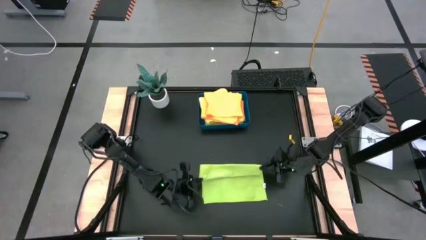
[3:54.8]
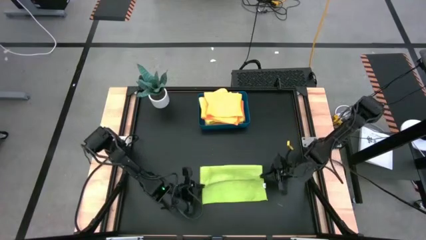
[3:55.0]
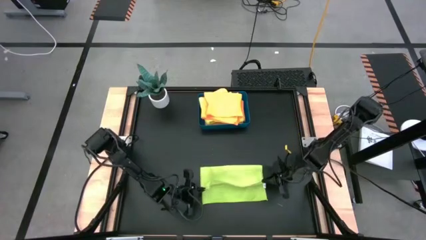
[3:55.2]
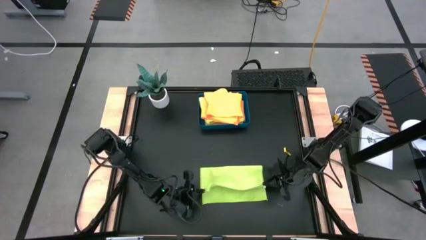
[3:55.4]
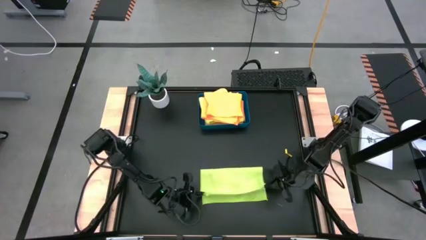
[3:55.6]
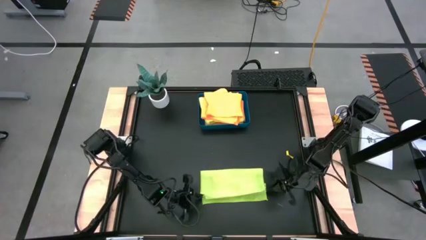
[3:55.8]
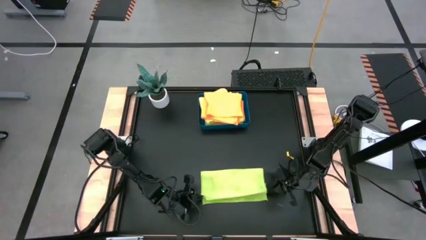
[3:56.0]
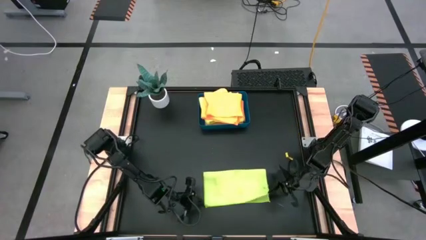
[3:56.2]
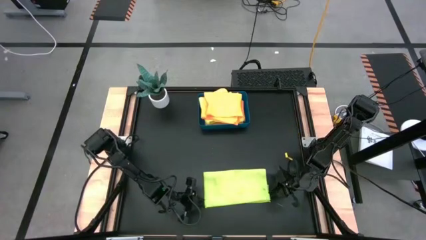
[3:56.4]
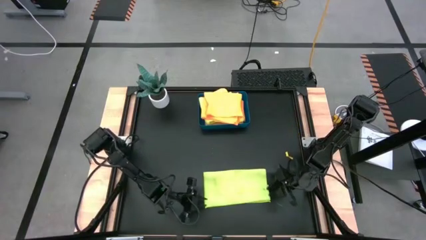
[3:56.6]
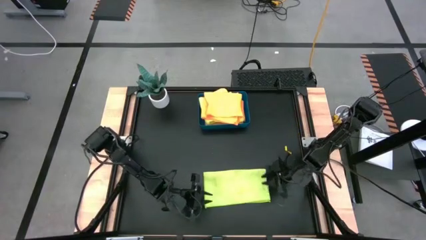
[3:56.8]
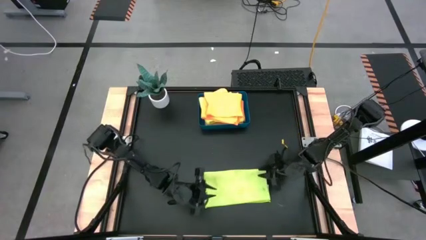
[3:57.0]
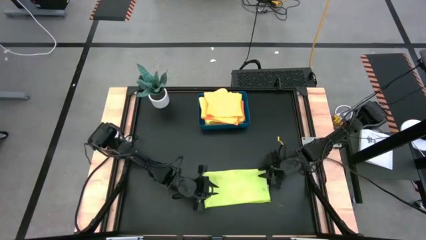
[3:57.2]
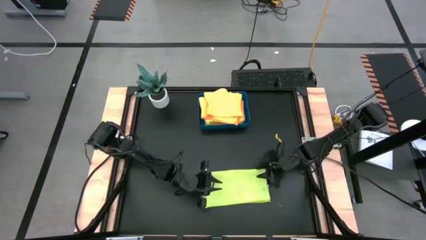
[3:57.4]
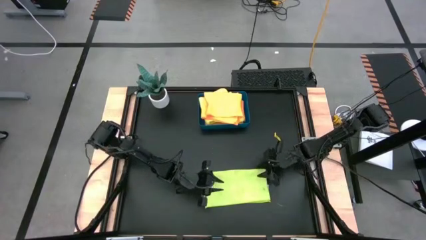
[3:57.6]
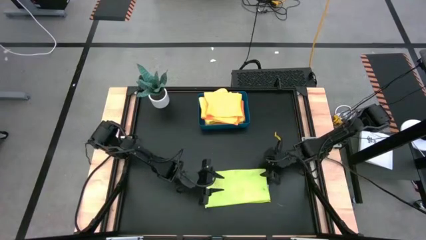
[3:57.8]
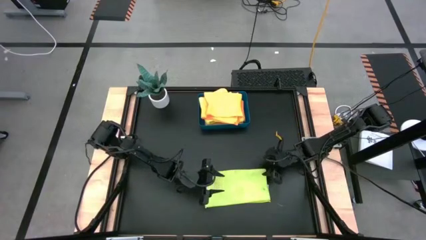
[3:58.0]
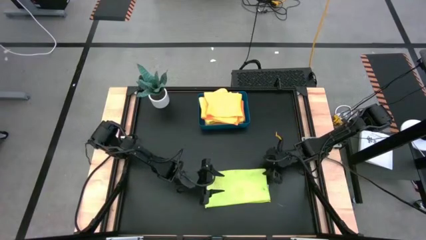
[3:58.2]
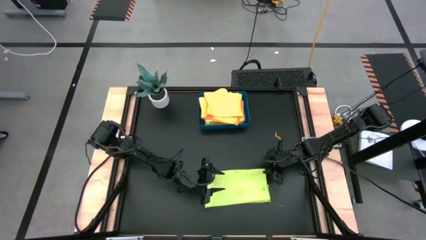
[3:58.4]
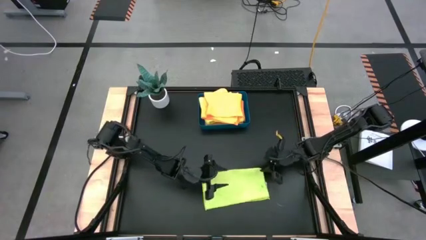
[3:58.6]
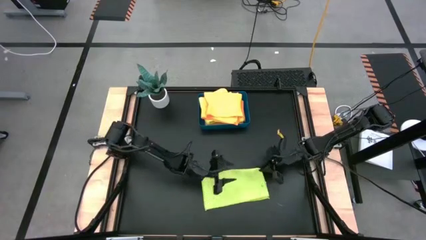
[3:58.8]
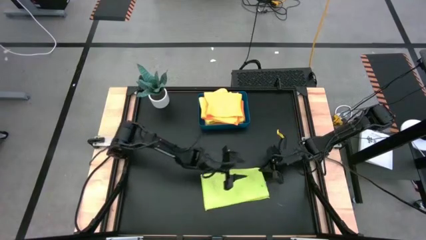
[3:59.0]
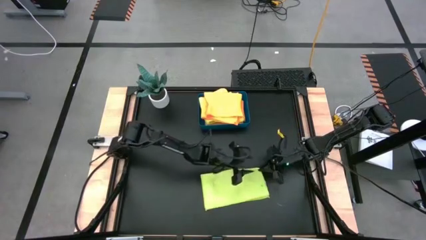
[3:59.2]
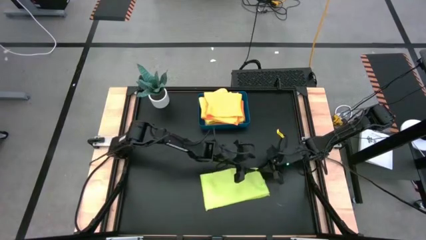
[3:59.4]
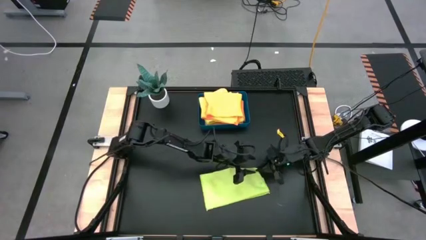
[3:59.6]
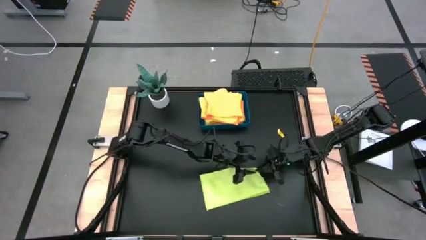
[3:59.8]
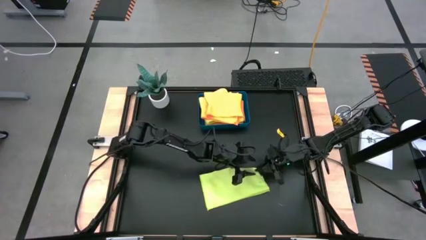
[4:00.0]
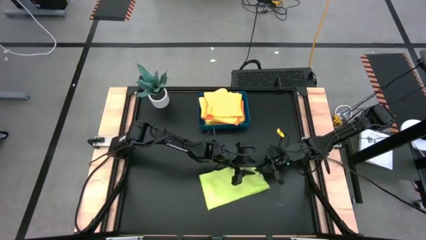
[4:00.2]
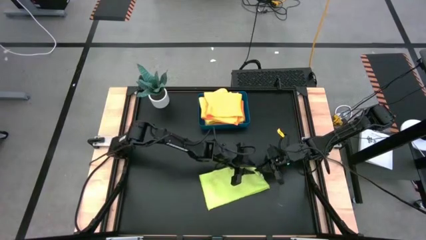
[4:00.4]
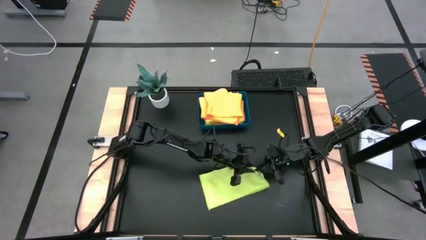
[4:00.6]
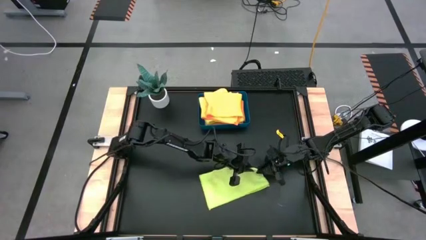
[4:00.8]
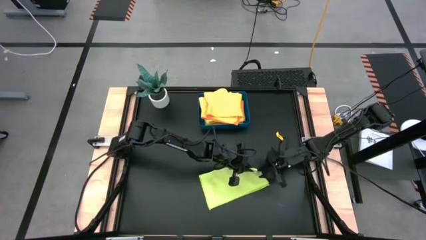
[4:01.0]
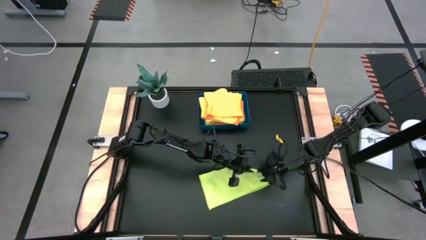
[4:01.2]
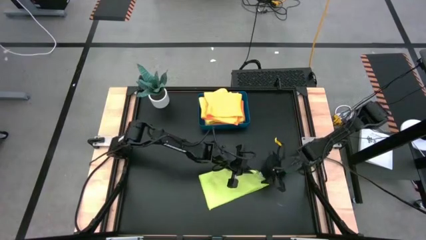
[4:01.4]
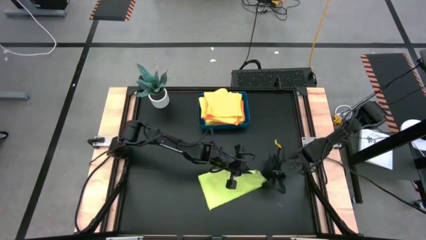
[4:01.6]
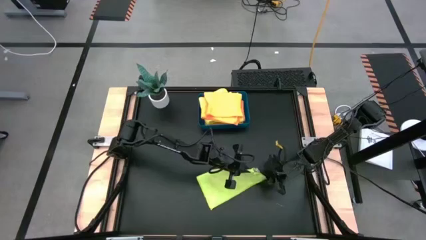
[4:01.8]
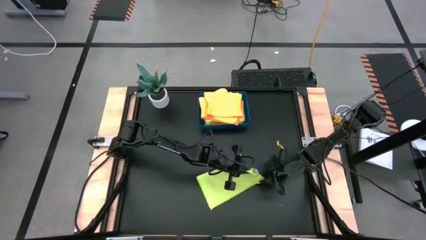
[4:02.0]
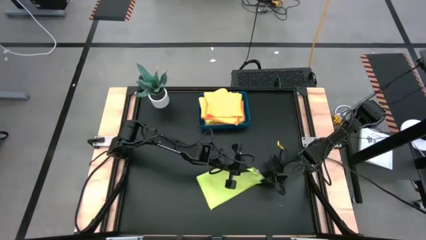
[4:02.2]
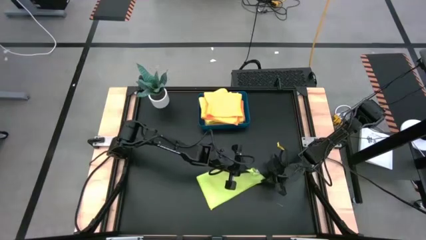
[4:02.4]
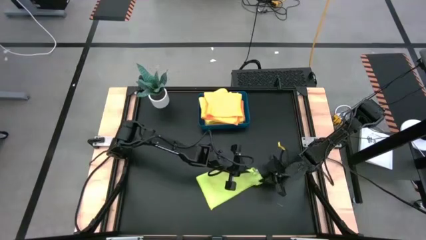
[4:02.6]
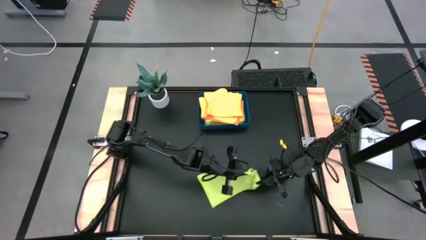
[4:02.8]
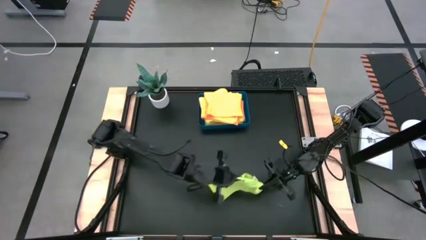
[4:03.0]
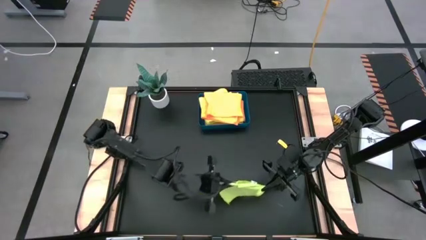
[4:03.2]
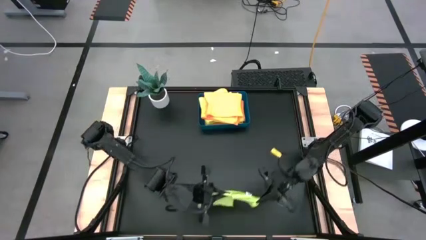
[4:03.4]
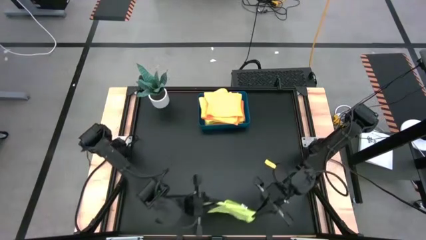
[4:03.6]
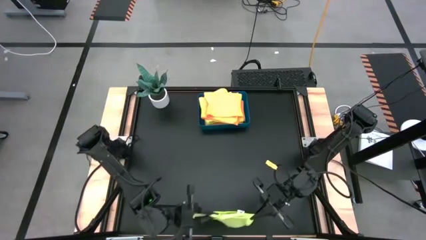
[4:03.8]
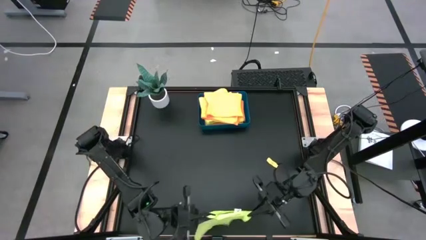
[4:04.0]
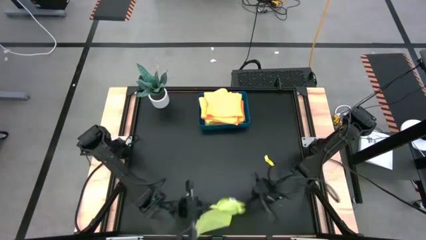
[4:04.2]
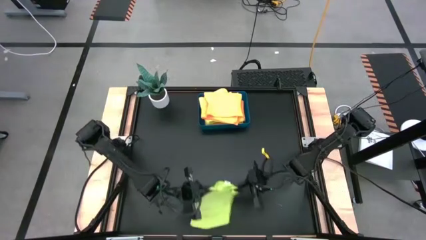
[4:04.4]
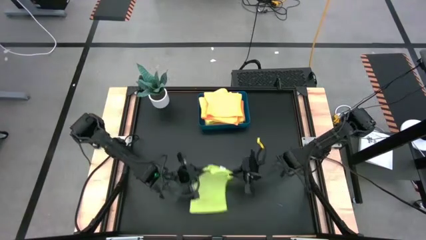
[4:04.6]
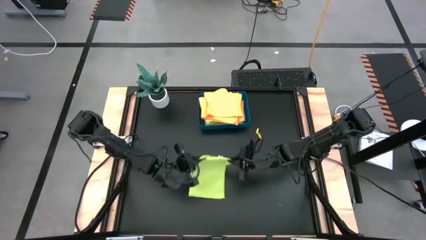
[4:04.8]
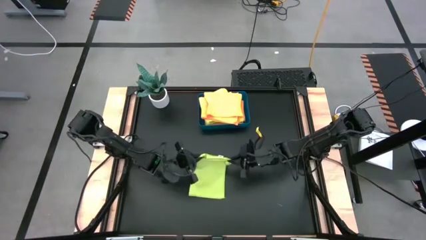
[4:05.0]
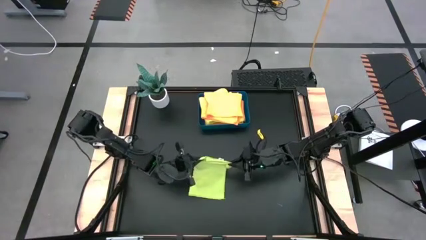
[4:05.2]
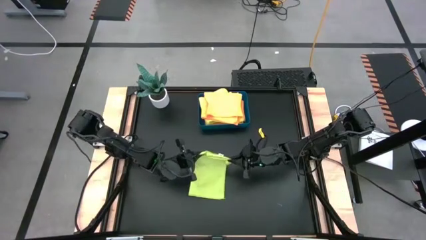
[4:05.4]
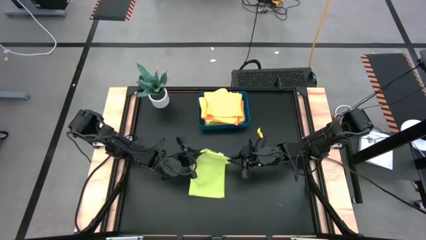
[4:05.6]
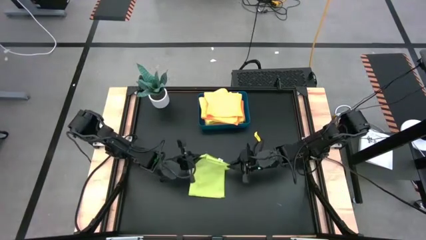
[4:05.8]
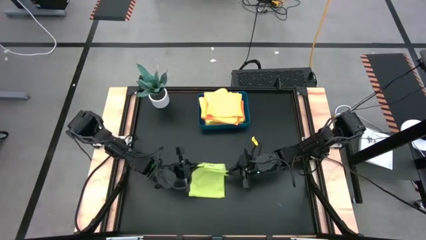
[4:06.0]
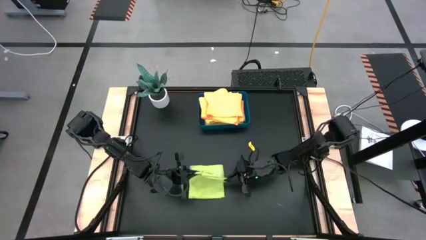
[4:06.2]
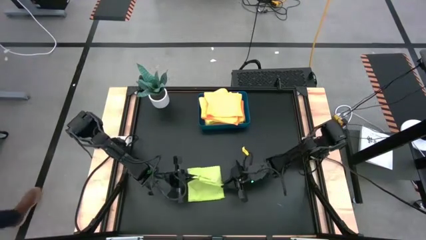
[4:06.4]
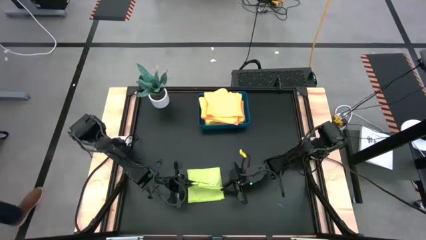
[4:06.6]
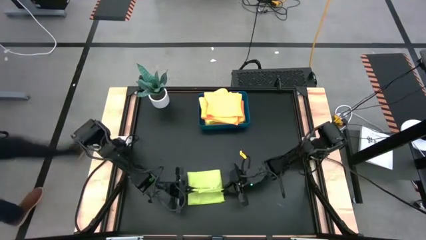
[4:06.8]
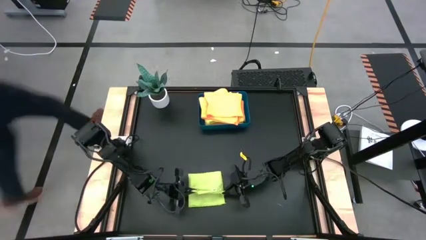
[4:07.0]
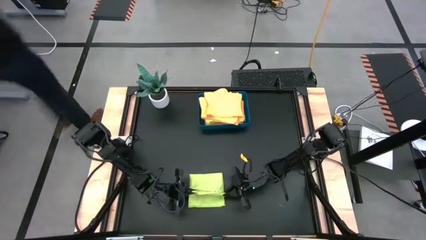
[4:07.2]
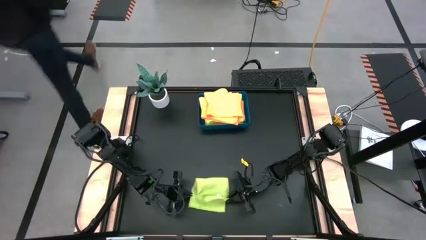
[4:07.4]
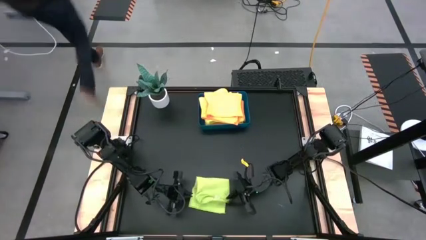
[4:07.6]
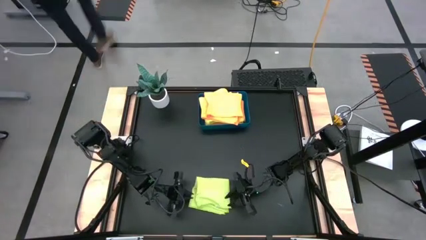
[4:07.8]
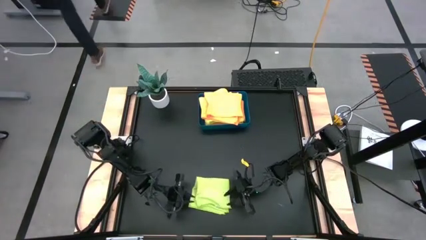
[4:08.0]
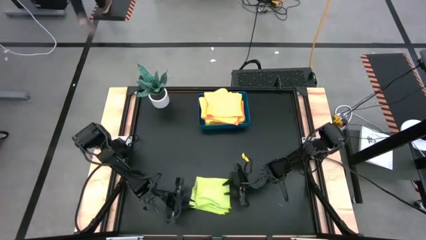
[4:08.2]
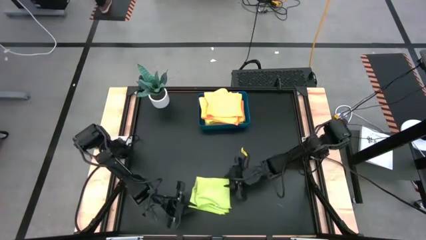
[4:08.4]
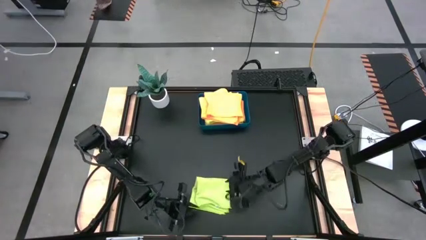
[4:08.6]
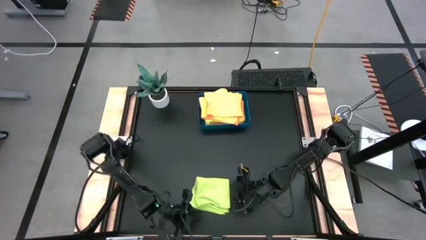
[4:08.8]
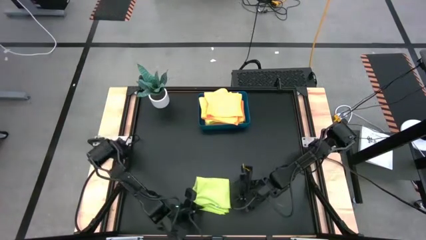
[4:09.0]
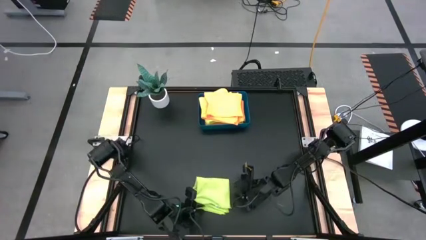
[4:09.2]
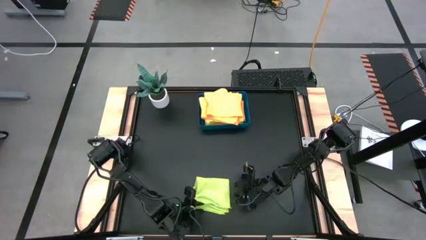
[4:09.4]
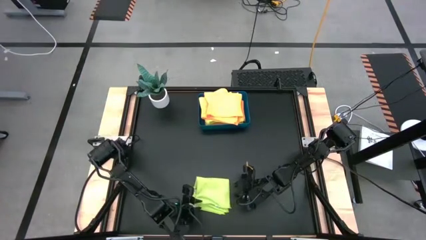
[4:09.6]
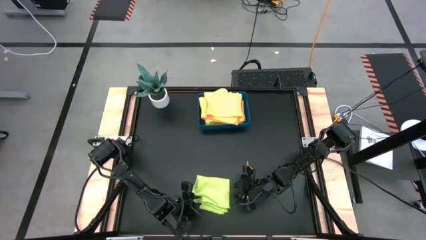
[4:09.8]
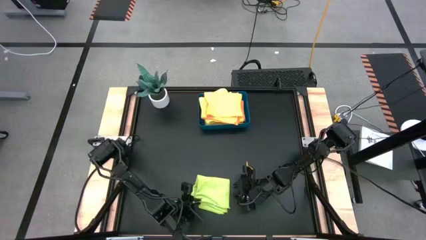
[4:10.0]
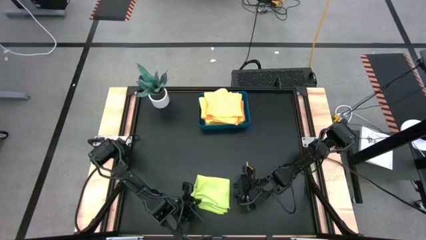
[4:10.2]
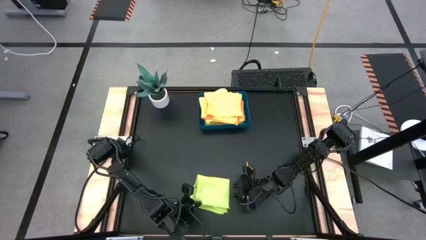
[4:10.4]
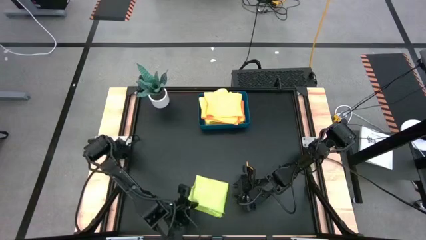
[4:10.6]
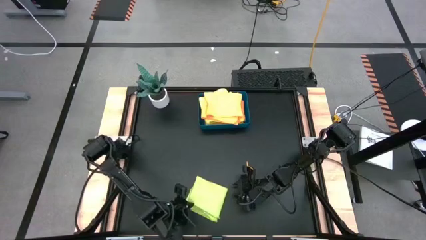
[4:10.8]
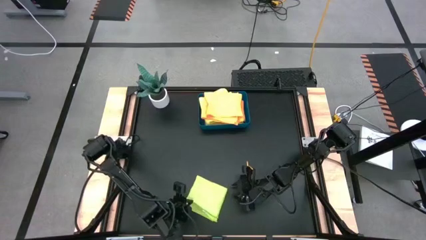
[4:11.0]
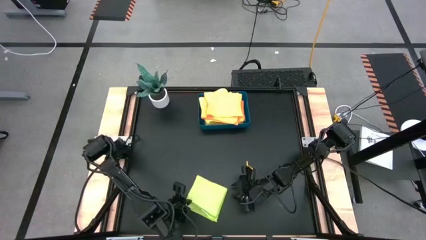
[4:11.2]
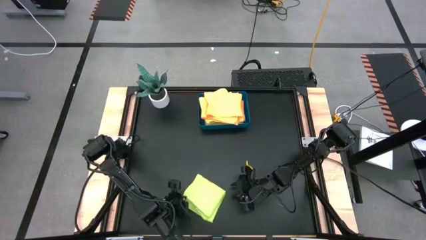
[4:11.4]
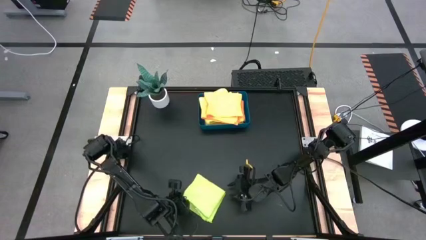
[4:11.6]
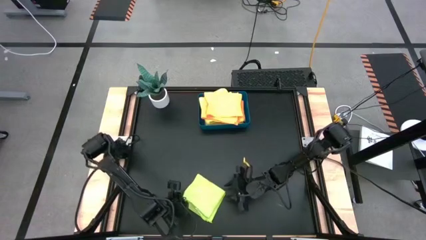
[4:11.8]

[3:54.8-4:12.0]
Task: Fold microfiber towels
Fold the green microfiber cloth
